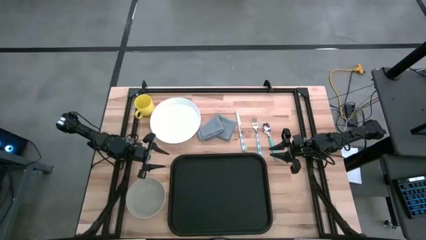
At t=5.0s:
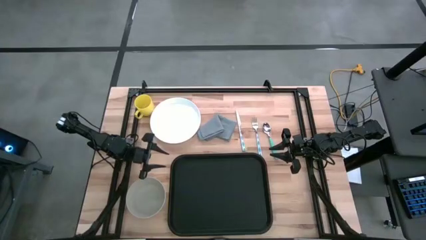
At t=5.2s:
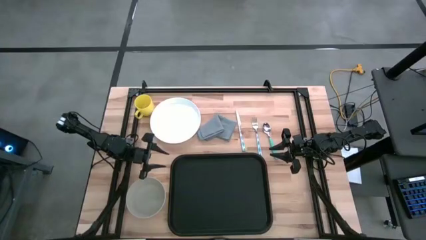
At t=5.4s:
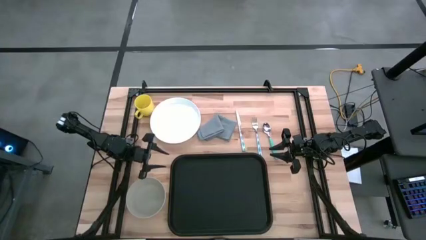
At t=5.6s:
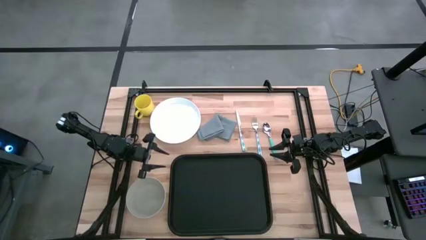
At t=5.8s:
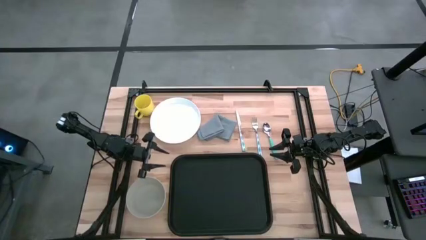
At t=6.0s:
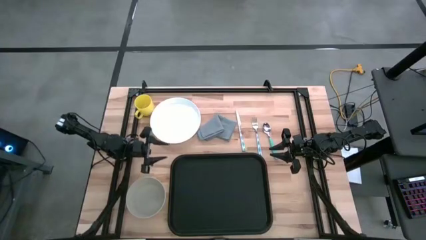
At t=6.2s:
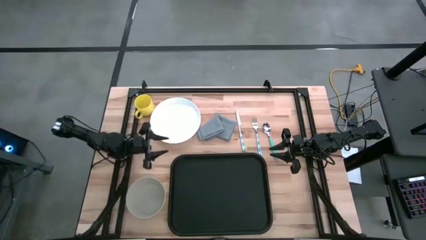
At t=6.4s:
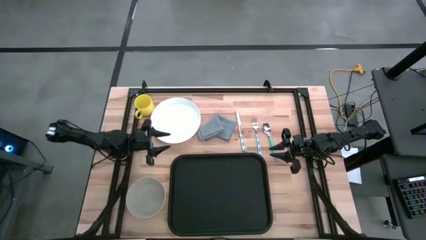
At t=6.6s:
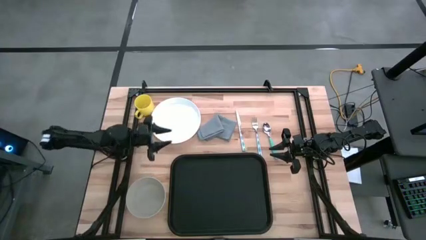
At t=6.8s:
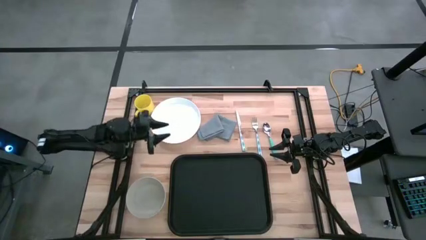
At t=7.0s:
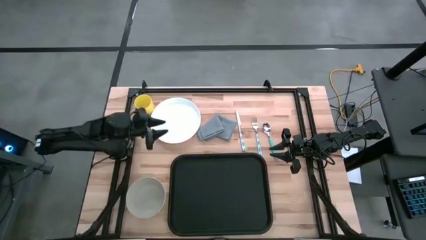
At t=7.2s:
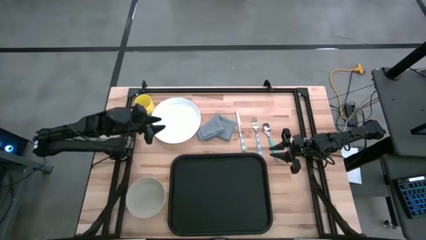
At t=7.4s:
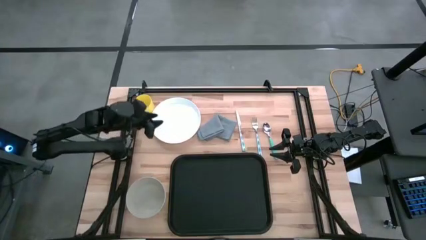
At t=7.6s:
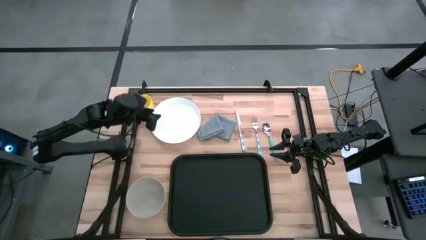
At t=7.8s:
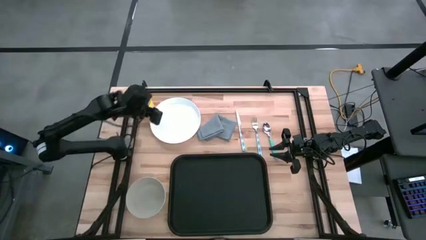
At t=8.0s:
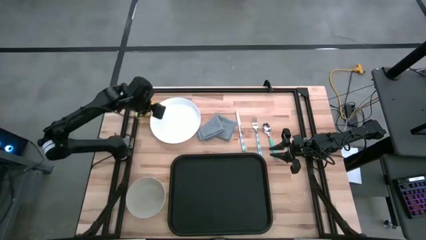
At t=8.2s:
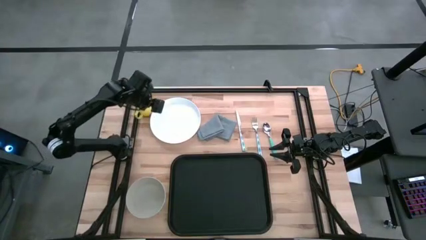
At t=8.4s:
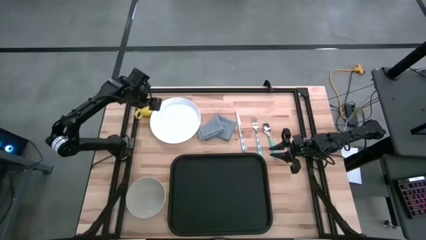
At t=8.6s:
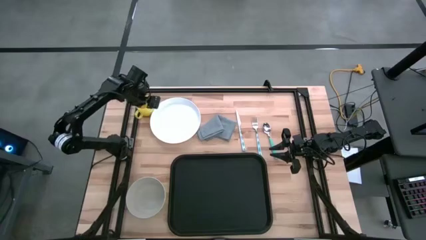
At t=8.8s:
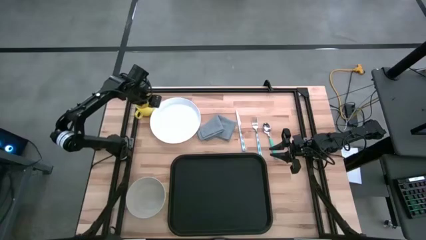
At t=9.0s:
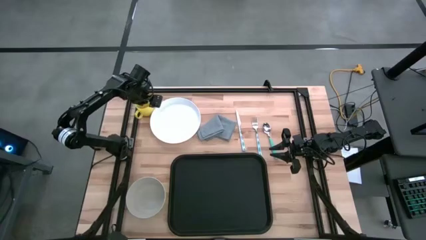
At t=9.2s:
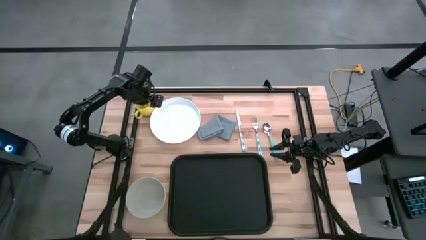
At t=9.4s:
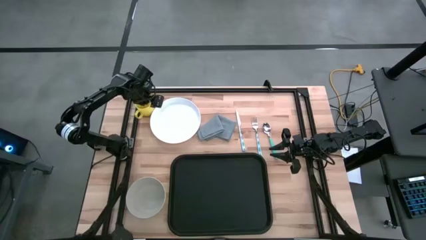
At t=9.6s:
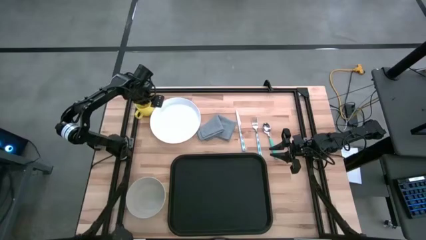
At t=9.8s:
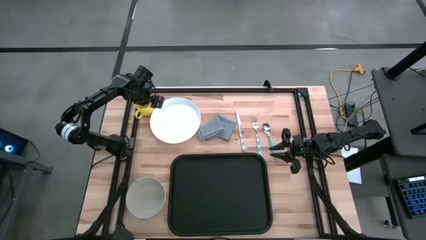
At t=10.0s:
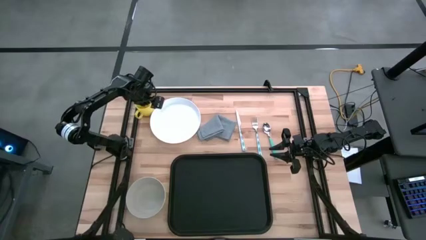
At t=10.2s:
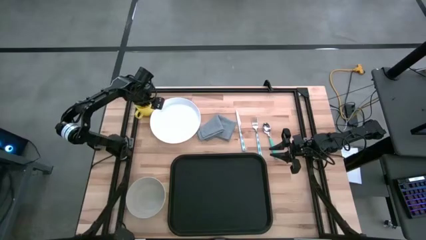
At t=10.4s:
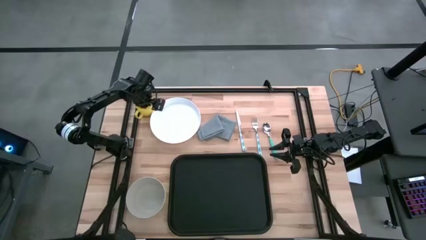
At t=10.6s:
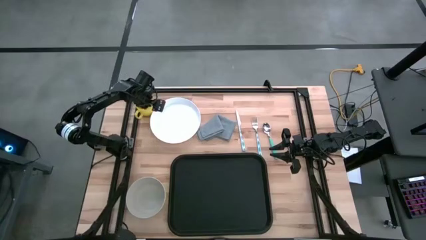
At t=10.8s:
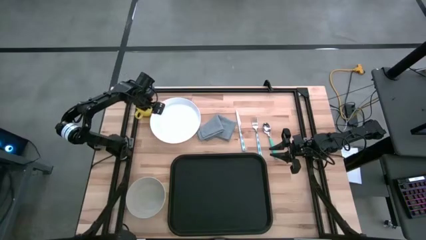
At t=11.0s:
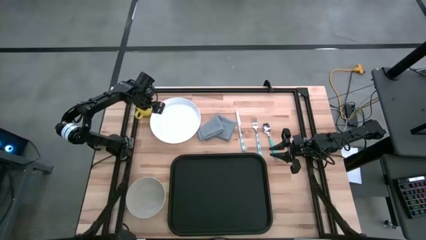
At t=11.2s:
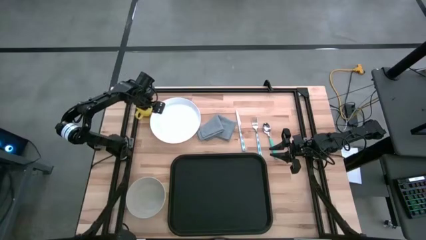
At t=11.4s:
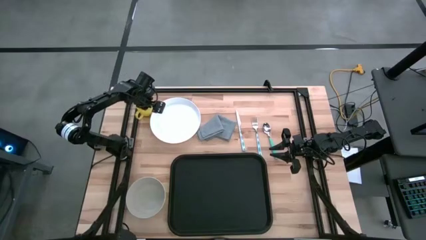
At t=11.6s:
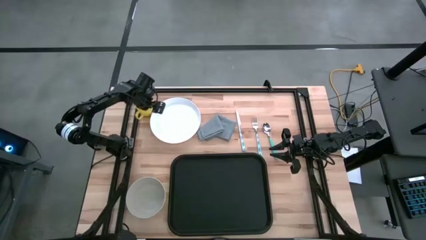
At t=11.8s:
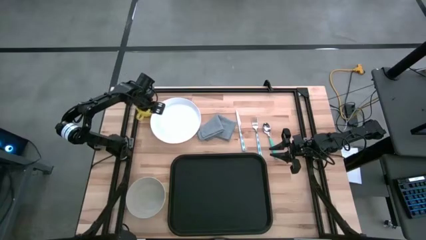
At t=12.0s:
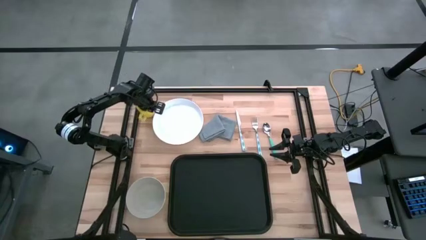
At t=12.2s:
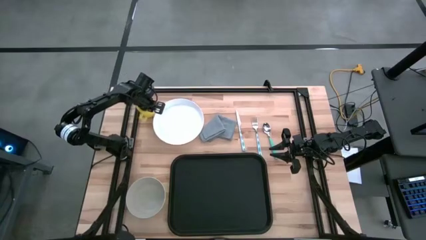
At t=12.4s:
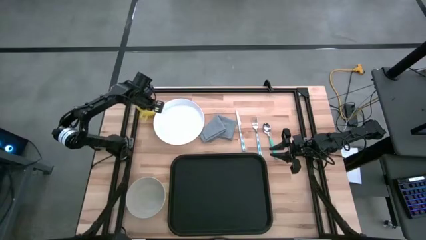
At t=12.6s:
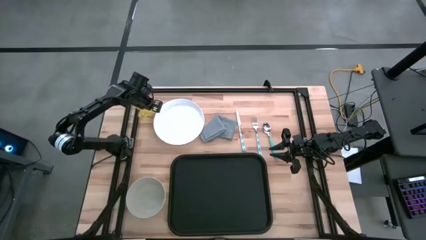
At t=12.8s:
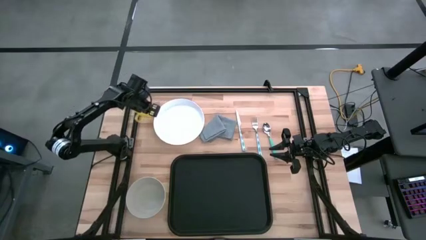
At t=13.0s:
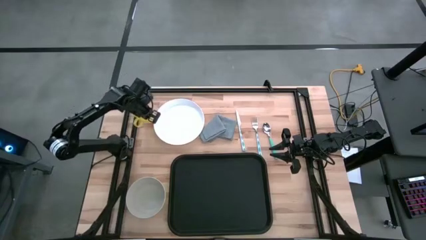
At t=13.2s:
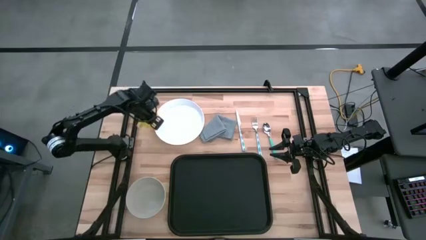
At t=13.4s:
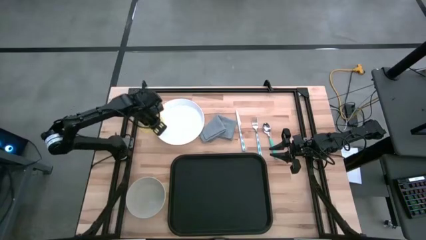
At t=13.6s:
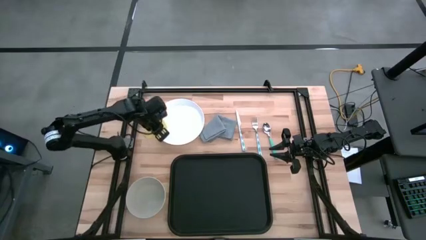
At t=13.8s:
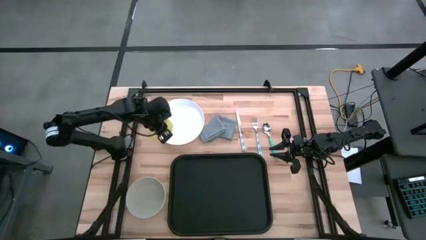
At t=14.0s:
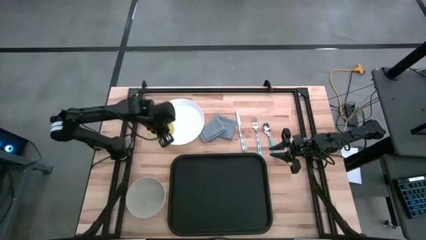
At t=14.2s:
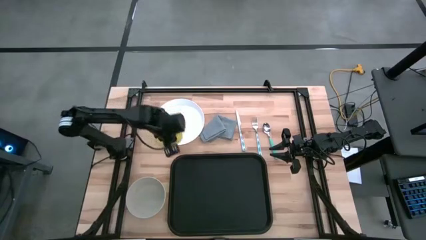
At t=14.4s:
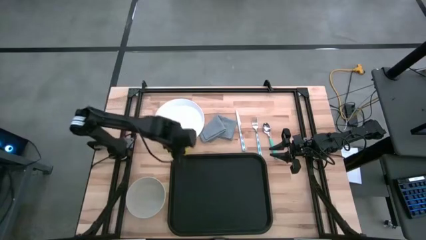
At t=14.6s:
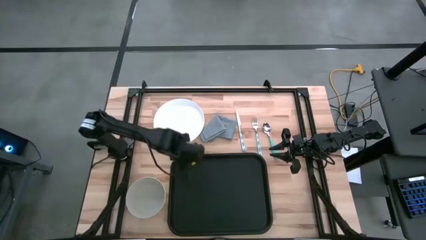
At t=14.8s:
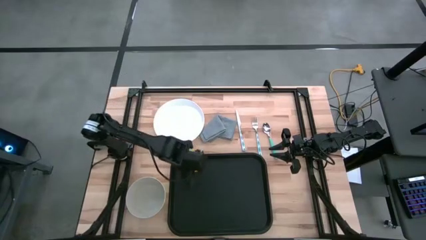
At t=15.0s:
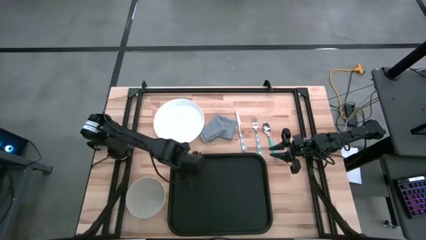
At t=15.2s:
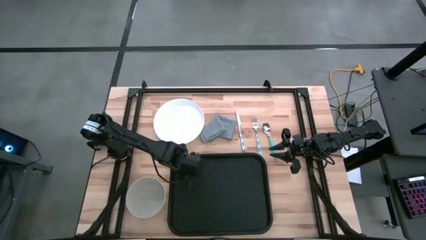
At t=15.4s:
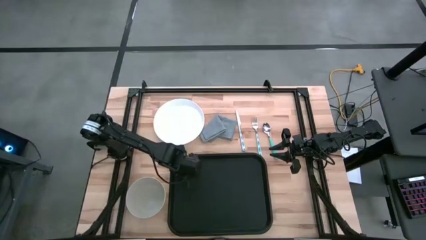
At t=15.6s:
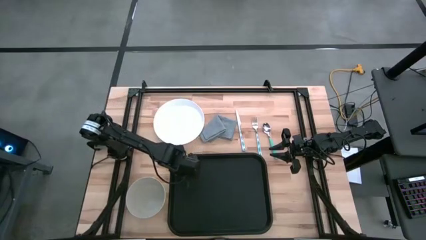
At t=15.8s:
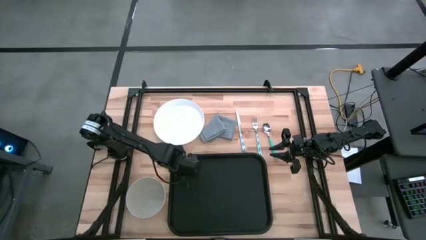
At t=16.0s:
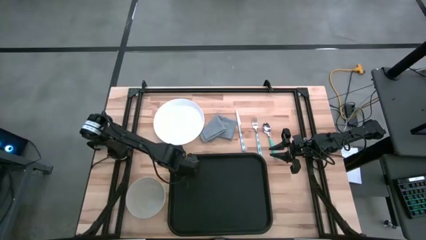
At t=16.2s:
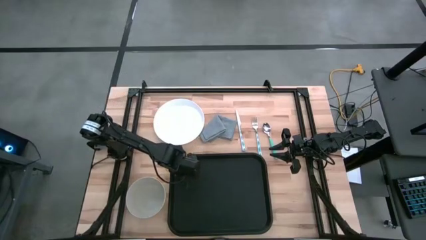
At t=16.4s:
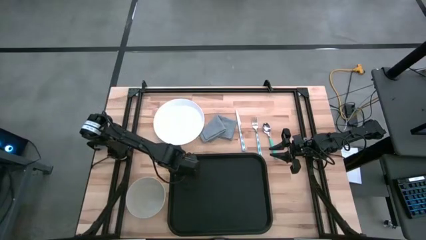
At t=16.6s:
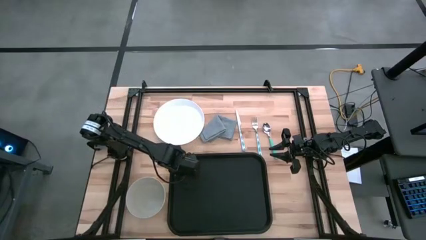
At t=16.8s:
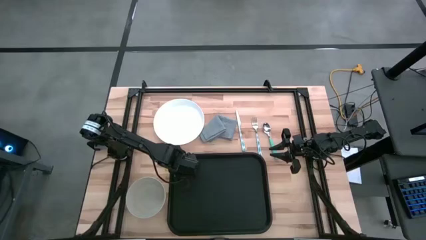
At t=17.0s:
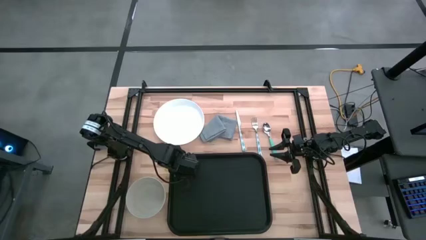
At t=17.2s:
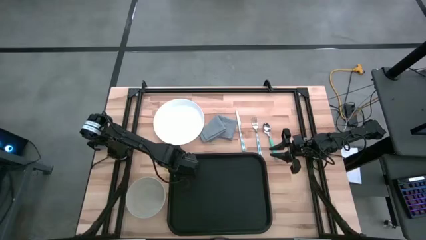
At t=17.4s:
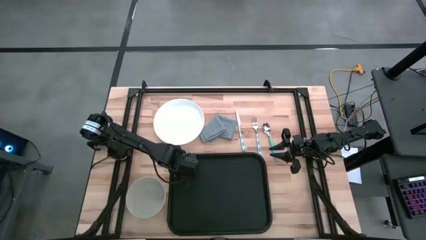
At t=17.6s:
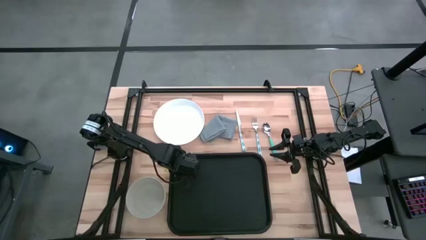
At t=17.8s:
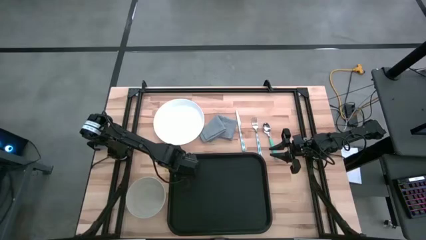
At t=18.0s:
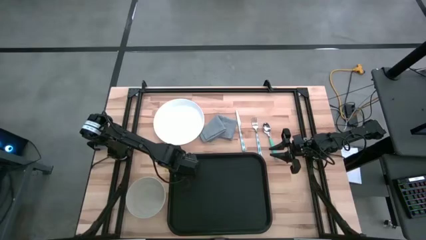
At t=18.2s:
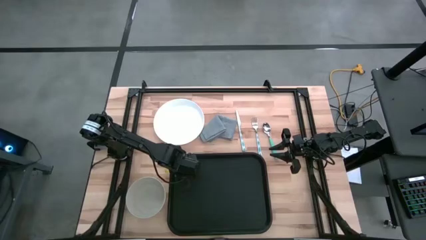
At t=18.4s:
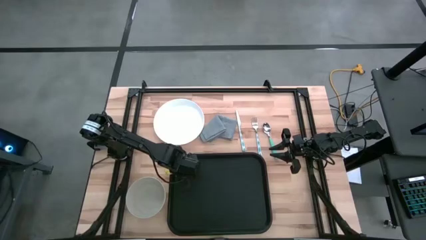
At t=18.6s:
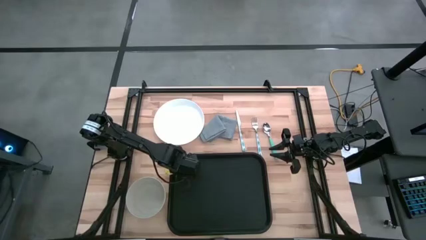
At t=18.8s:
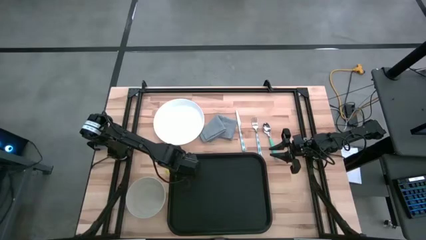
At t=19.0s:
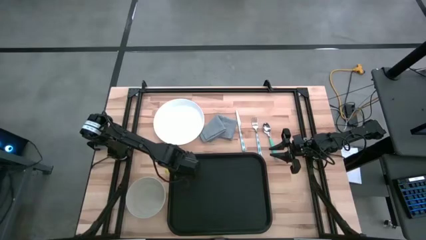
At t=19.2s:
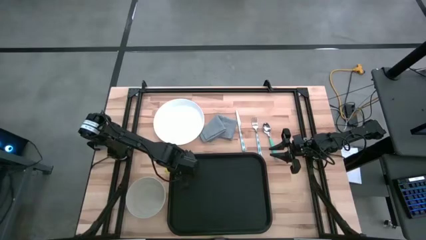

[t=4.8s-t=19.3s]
Task: Set up tray
Put the yellow mug on the black serving tray
